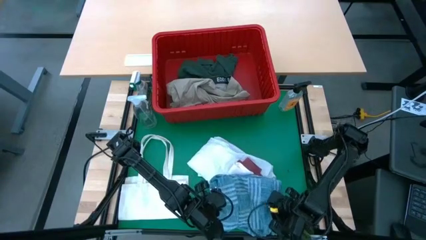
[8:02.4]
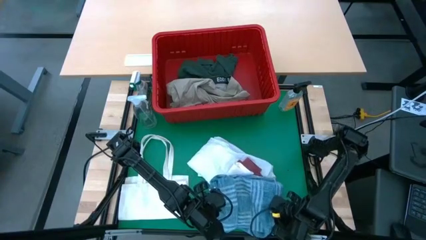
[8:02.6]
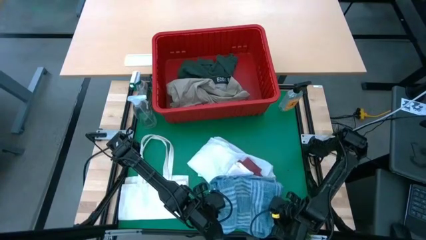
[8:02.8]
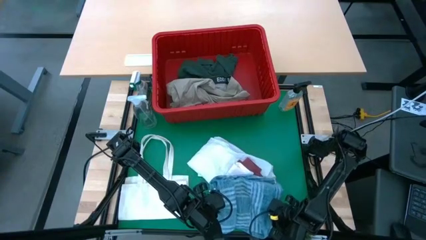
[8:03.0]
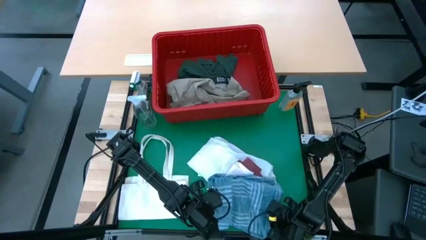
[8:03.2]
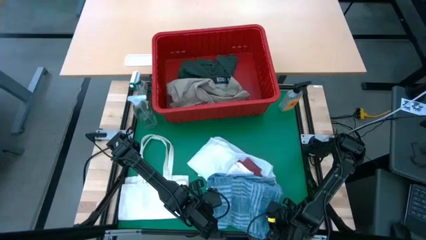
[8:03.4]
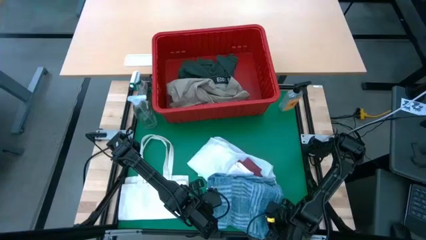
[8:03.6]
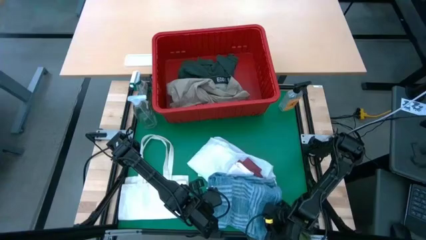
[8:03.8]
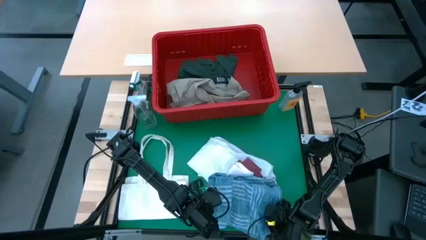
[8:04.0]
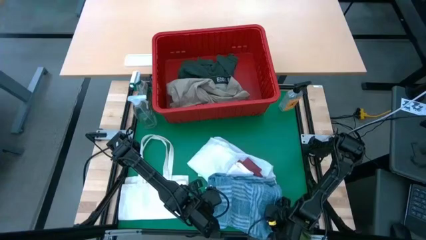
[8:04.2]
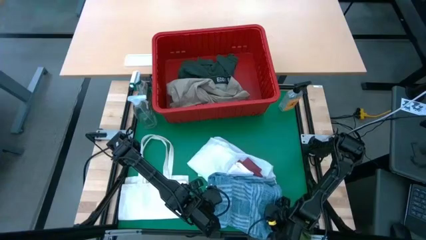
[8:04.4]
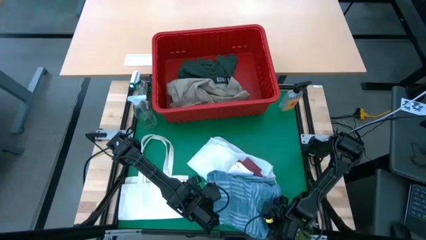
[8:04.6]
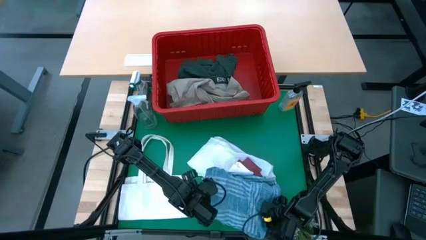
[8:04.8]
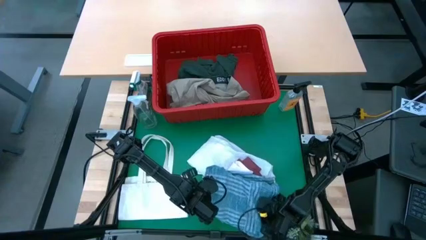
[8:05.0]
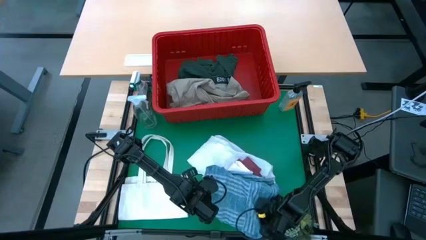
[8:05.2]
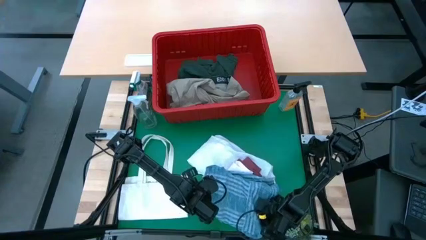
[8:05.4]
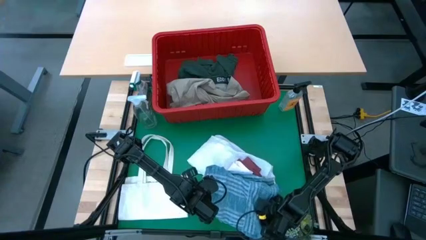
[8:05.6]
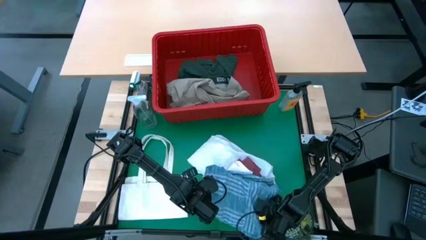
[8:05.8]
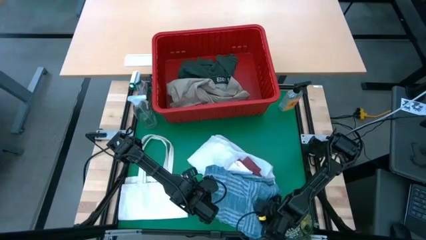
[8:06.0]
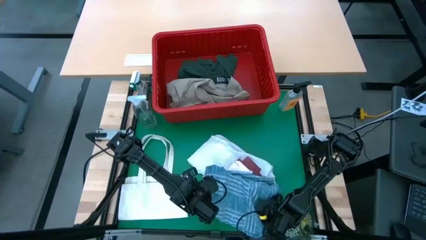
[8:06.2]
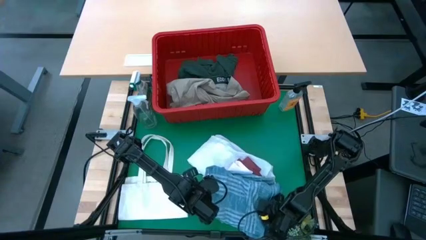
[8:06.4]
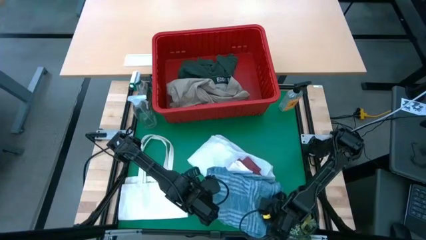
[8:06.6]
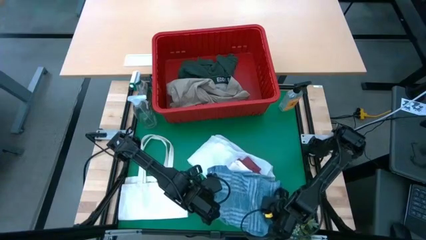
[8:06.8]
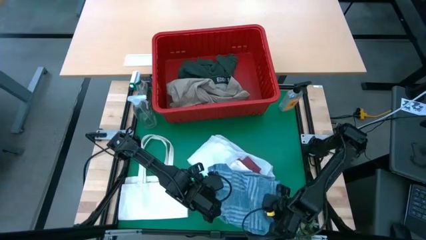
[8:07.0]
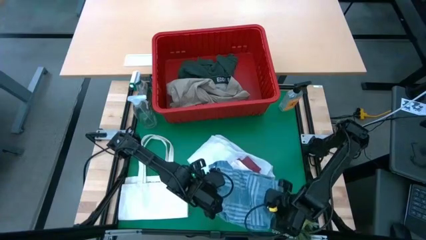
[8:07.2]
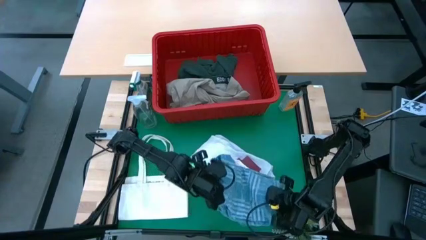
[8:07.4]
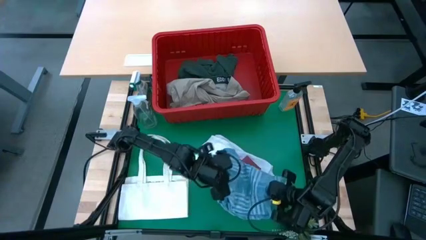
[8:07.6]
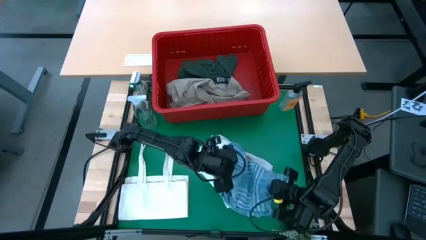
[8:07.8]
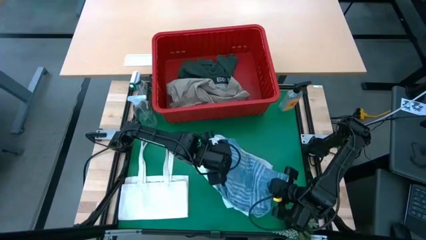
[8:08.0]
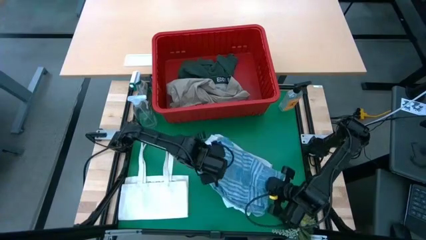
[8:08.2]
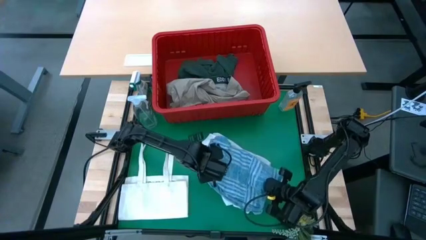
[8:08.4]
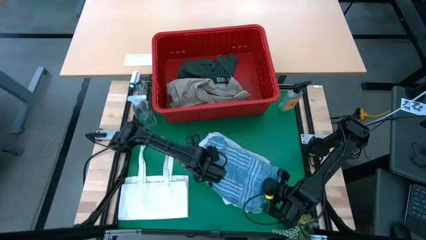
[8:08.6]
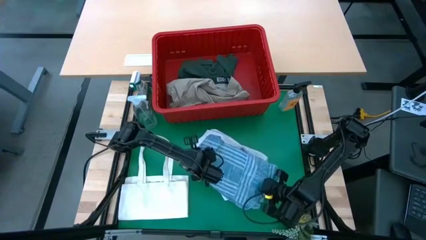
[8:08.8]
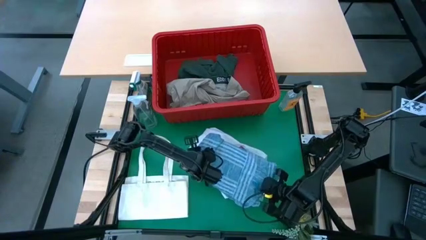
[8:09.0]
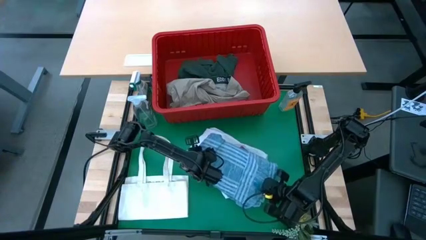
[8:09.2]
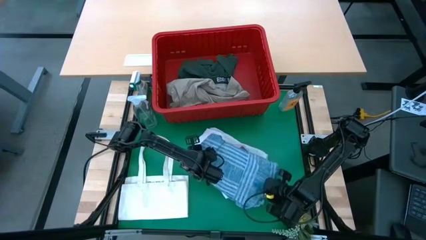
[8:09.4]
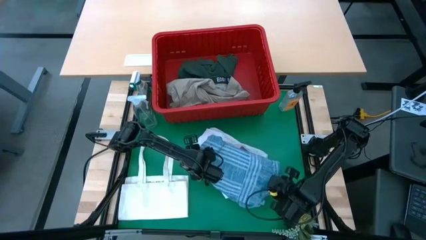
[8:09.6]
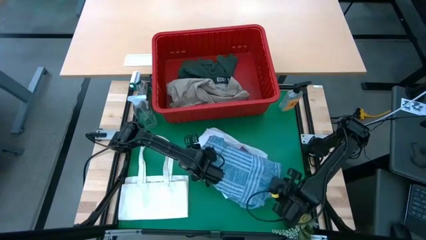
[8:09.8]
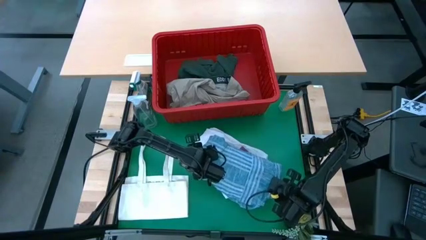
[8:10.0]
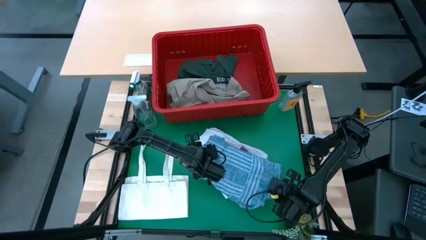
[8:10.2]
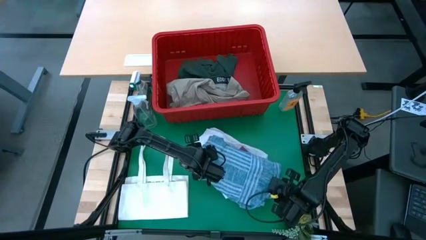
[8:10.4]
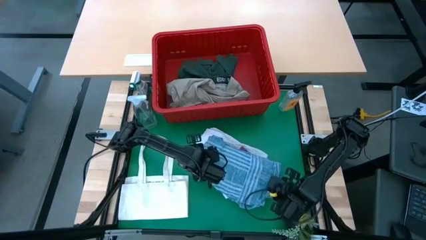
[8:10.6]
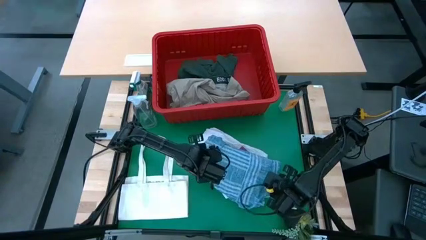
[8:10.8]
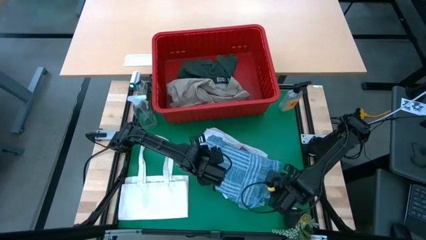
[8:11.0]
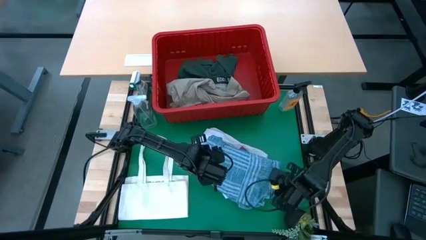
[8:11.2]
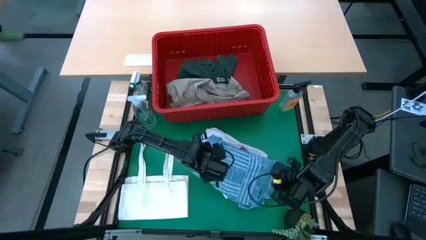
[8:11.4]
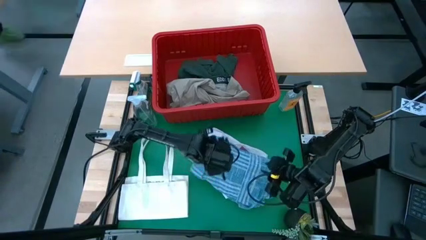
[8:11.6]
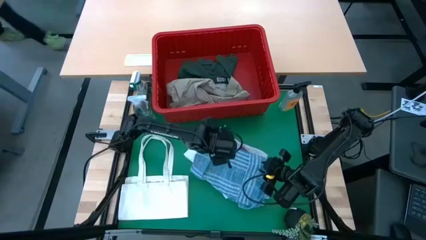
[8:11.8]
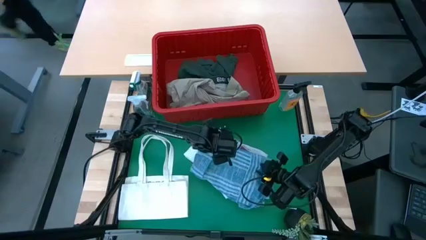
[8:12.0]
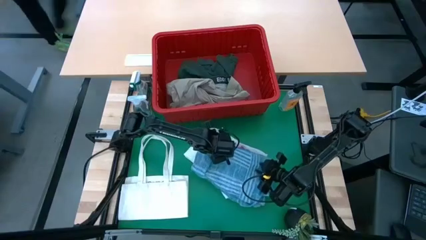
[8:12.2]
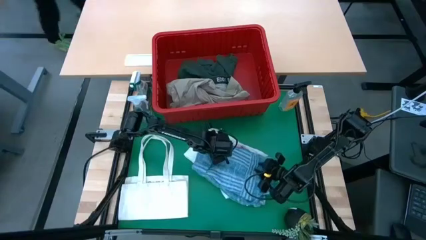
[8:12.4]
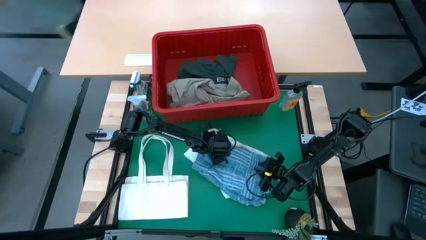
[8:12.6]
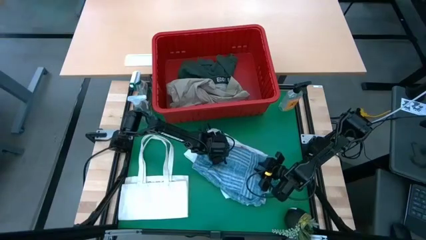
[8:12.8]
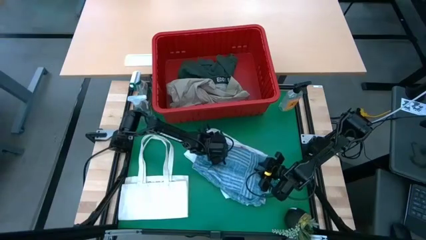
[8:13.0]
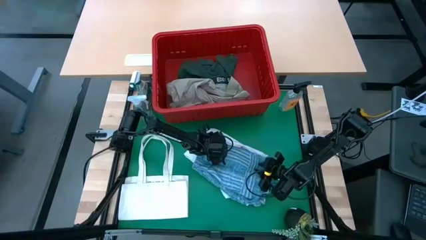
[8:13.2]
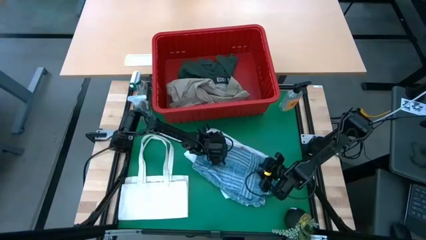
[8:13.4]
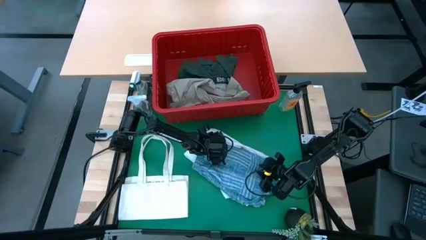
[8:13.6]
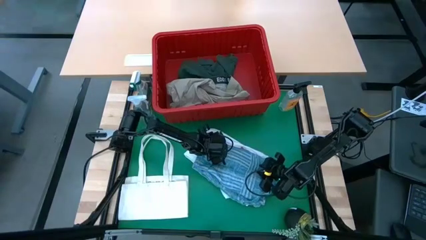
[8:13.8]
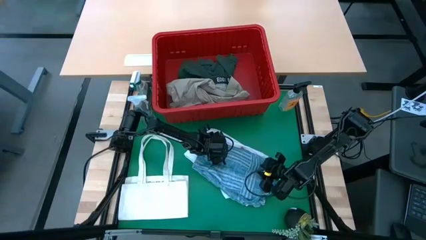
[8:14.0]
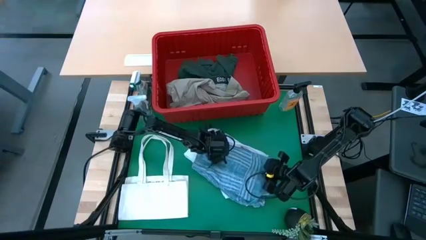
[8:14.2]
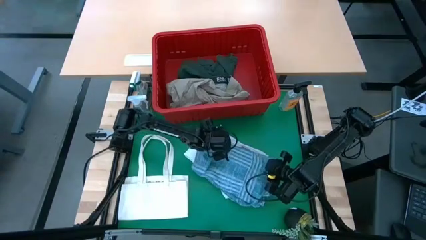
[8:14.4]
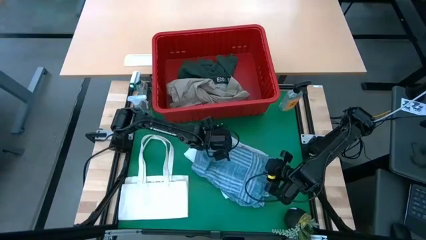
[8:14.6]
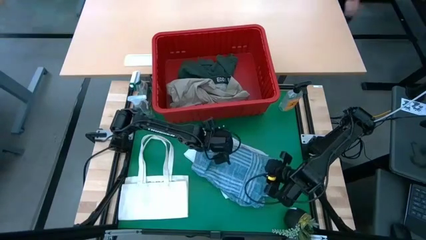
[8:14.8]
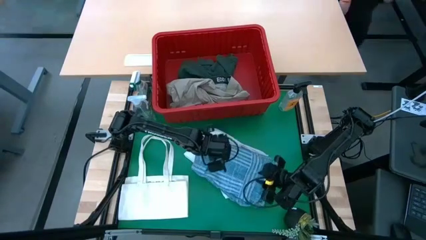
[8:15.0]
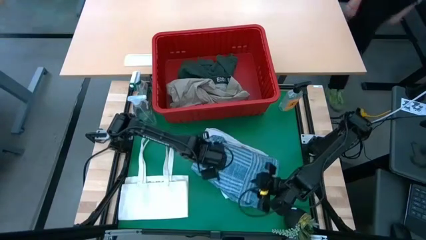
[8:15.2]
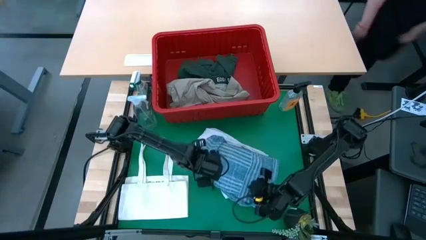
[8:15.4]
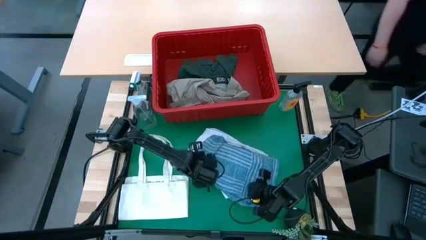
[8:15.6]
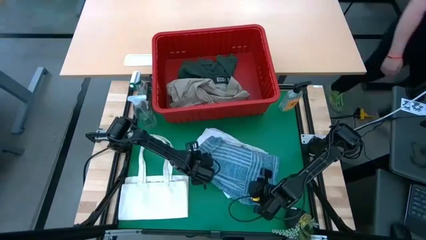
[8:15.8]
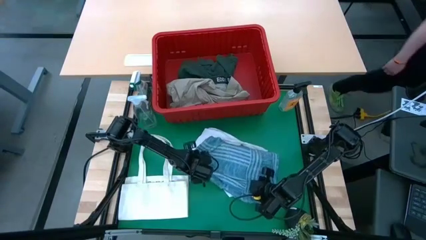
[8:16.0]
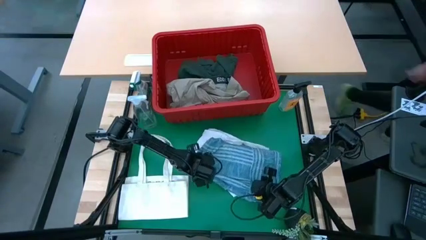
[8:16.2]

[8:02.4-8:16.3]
Task: Fold Laundry from Bin
Stack the blue checkered polo shirt on top of the folded white underwear
